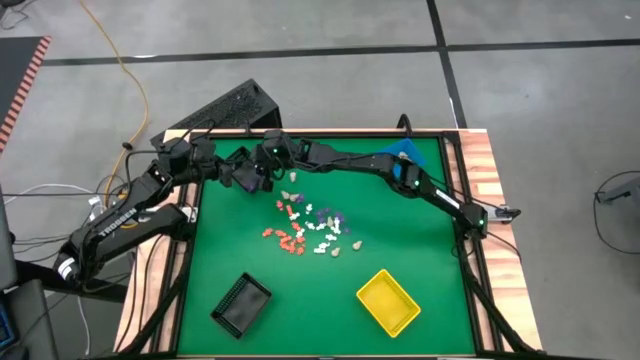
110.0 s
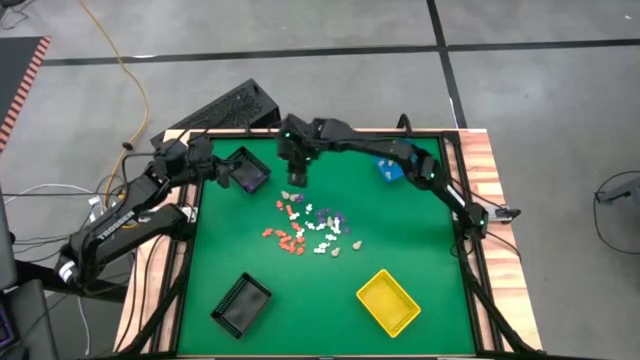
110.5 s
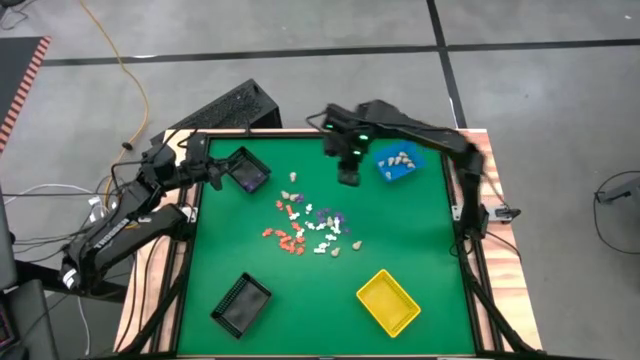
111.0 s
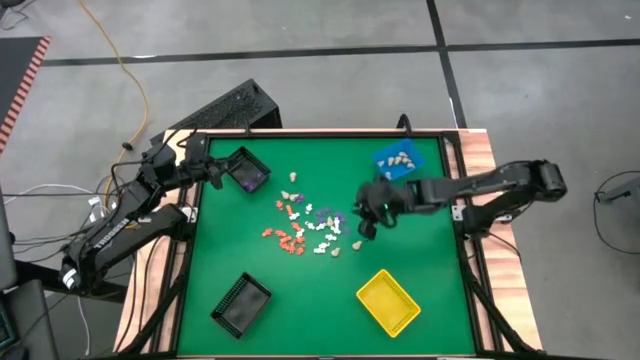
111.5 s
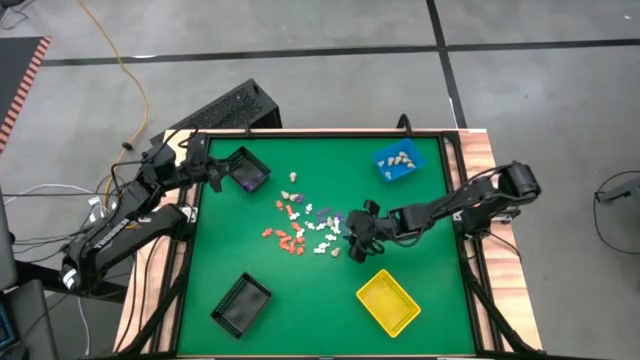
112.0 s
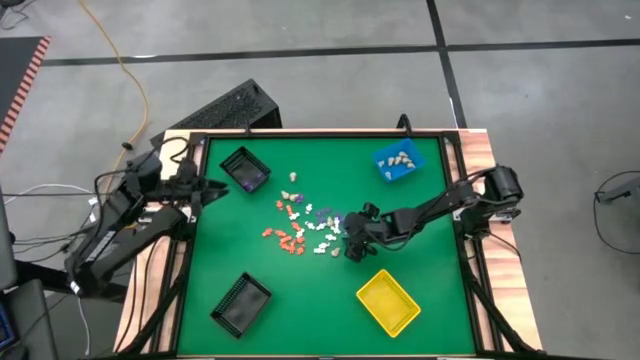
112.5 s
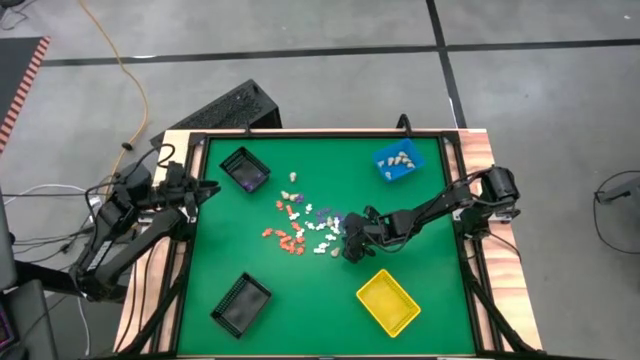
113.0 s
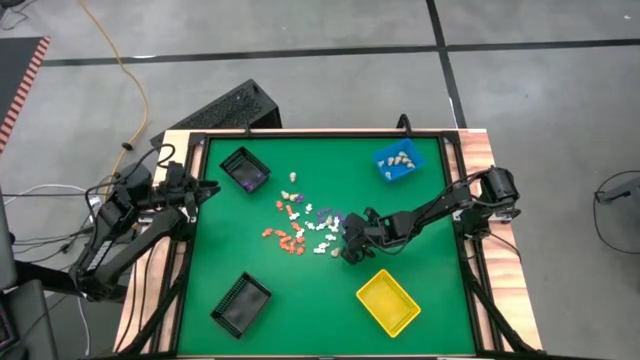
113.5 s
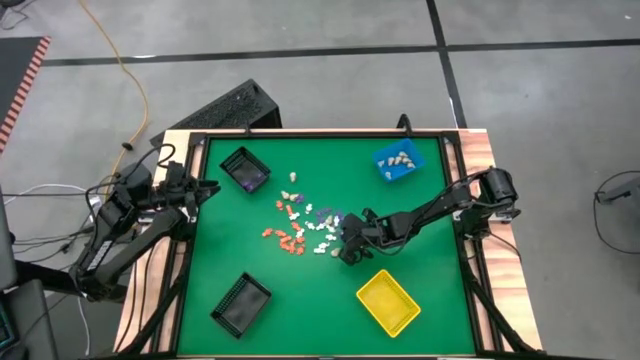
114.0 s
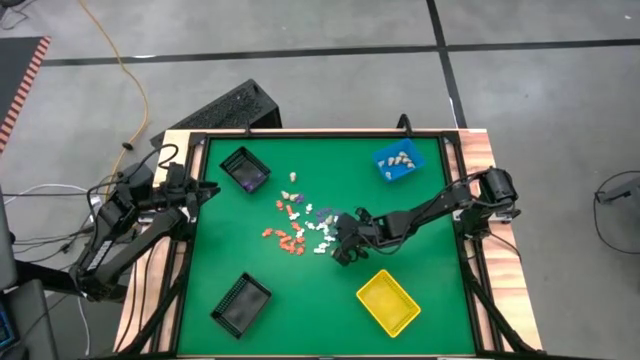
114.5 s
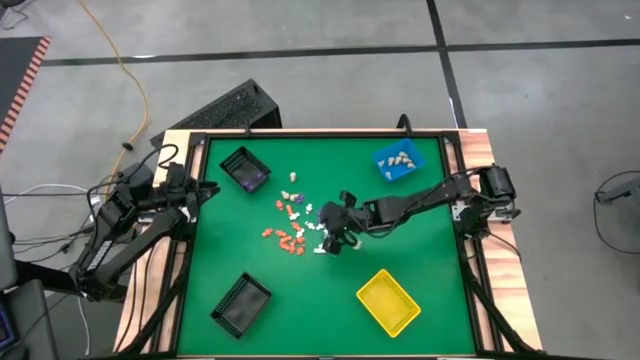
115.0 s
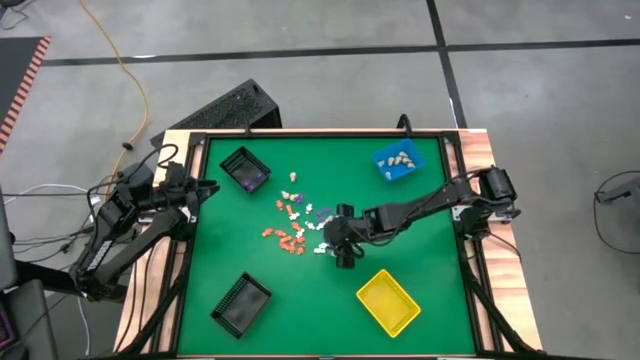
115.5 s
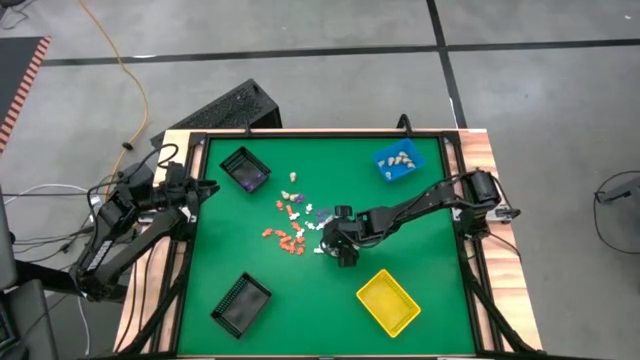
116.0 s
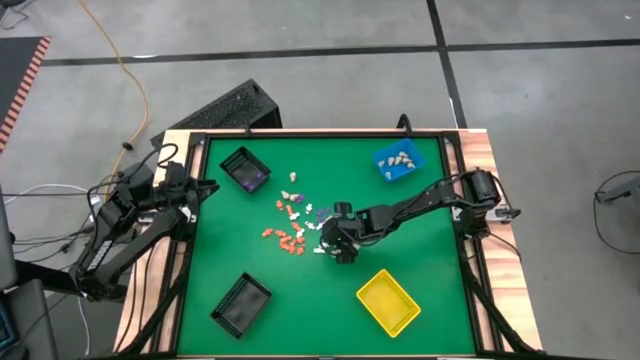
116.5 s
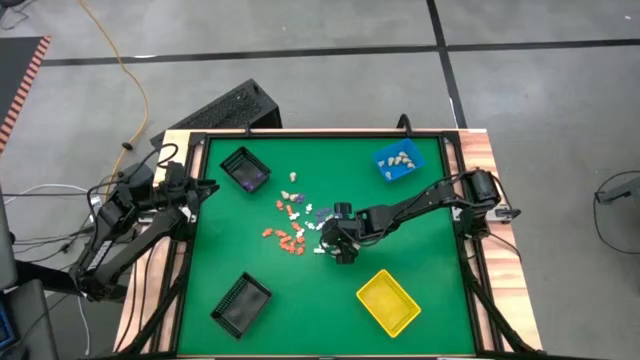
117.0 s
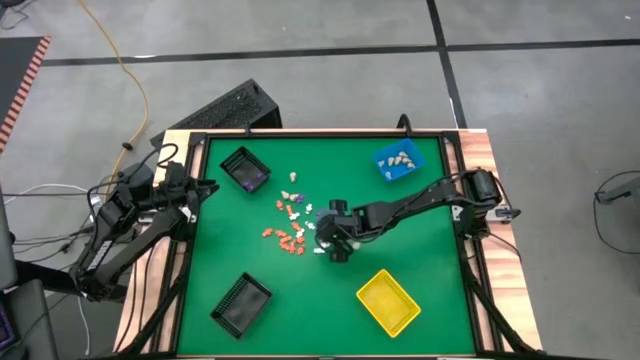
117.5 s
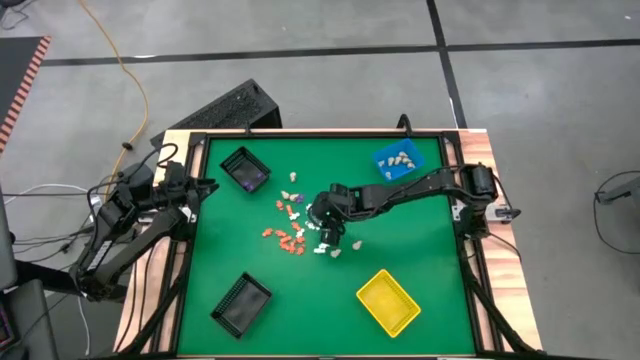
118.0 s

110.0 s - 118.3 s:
Task: Sort Halloween decoration
Put the purple spider toy into the top black basket

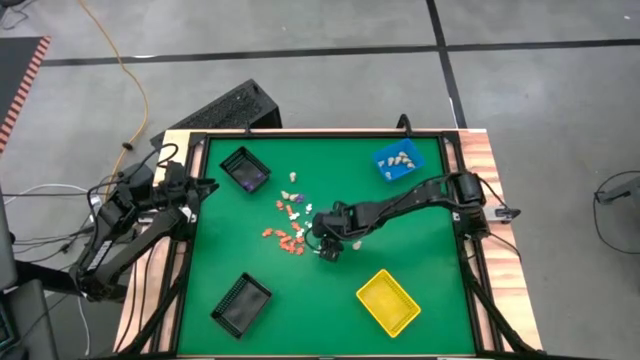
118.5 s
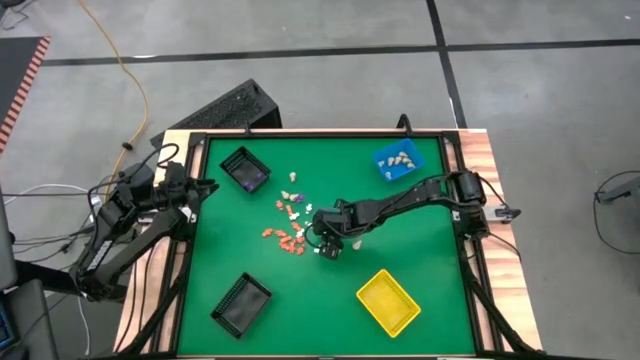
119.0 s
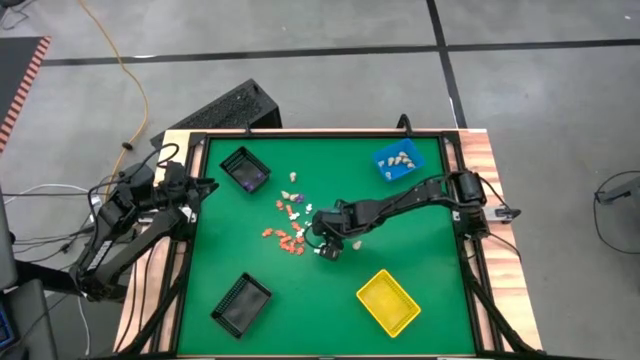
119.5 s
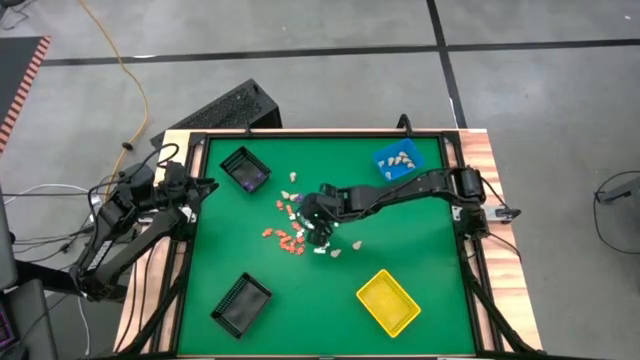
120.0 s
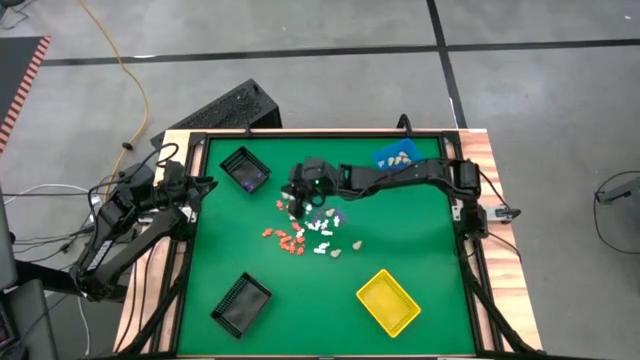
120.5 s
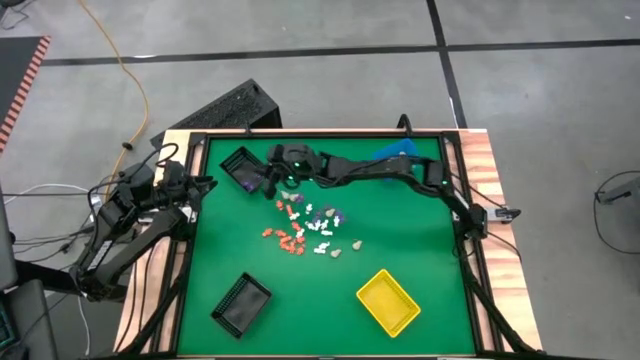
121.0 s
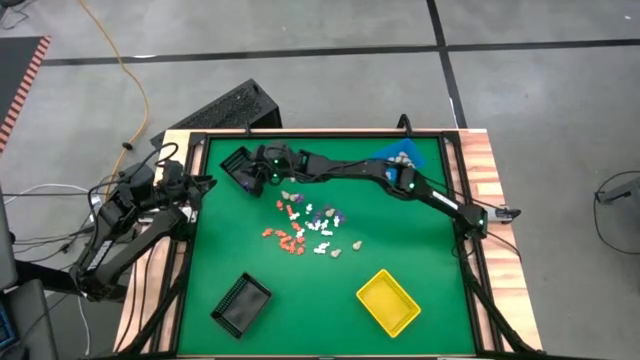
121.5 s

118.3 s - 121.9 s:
Put the purple spider toy into the top black basket

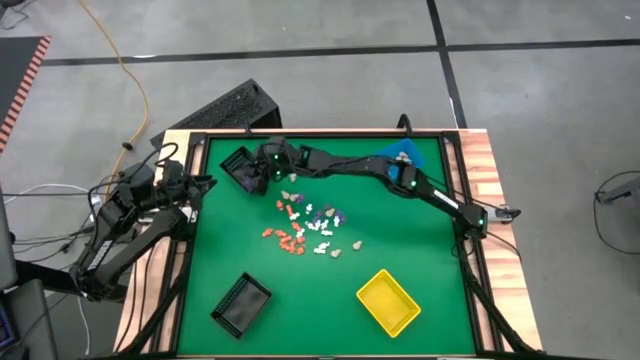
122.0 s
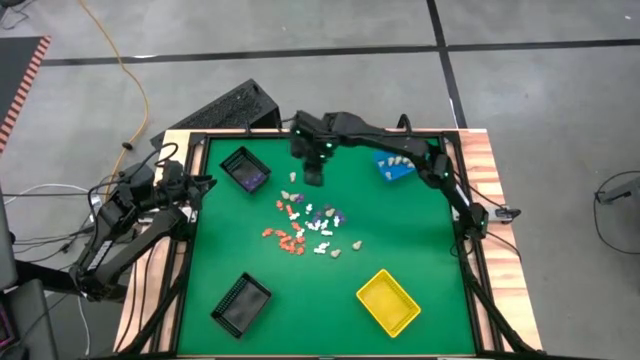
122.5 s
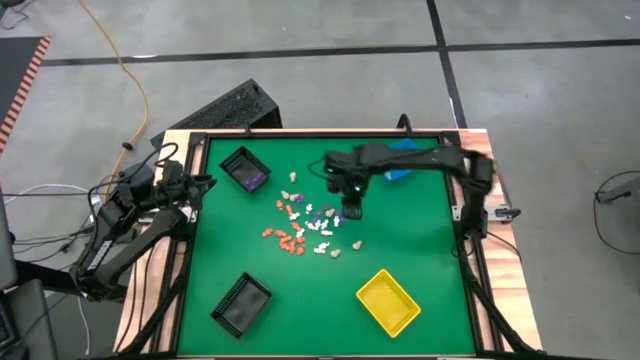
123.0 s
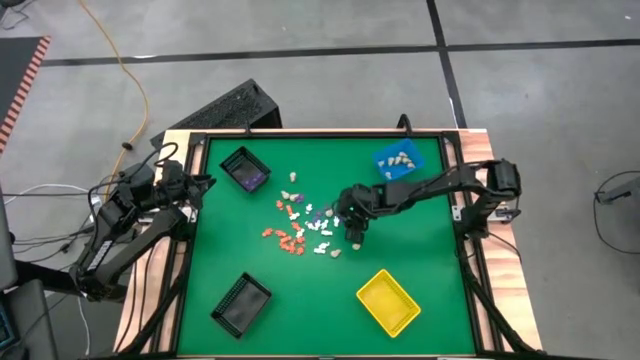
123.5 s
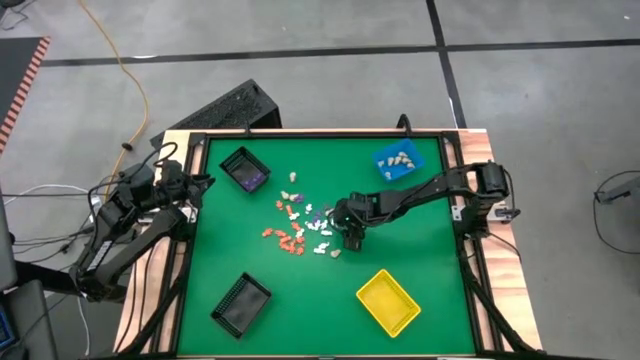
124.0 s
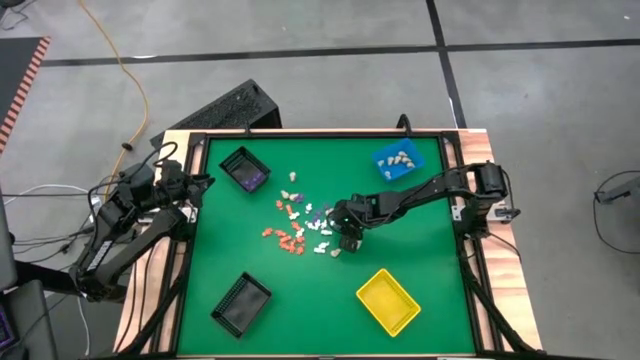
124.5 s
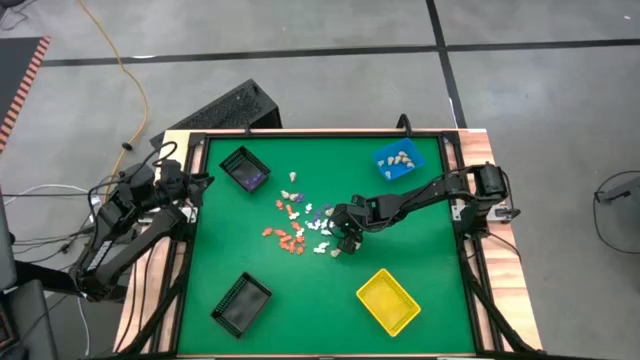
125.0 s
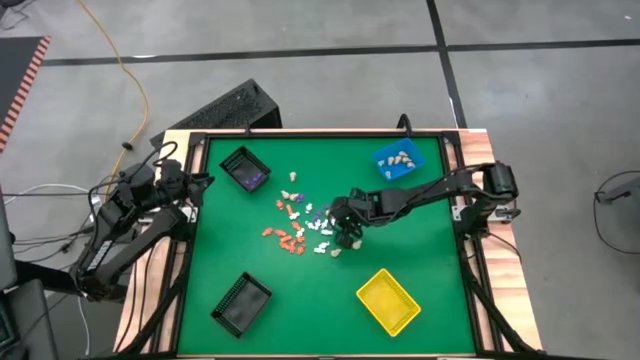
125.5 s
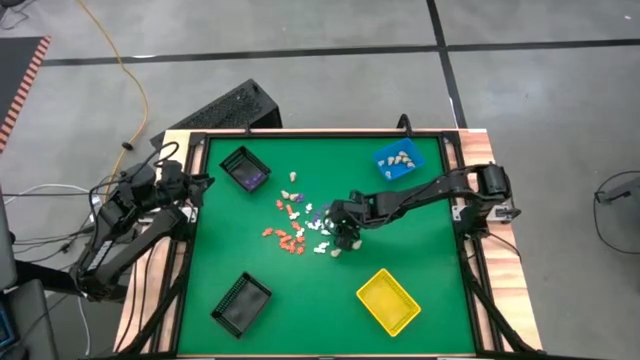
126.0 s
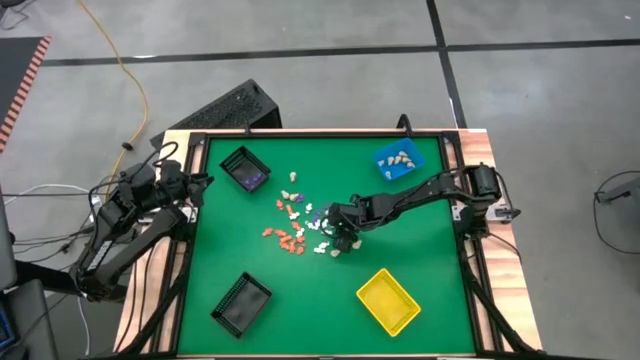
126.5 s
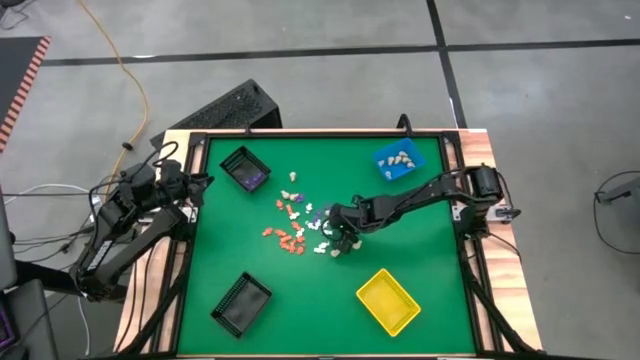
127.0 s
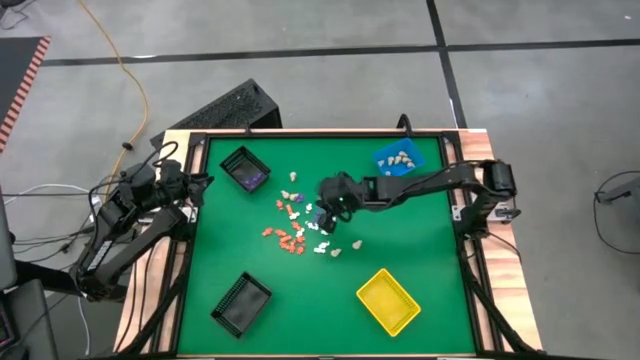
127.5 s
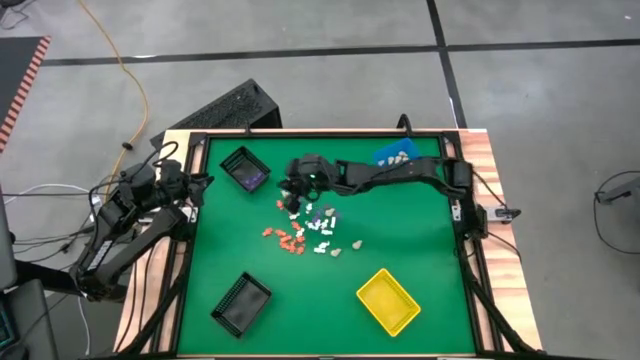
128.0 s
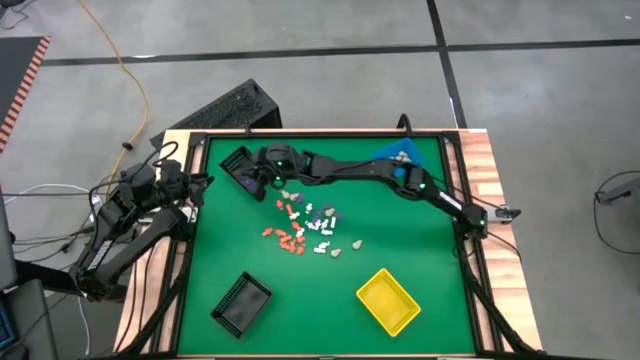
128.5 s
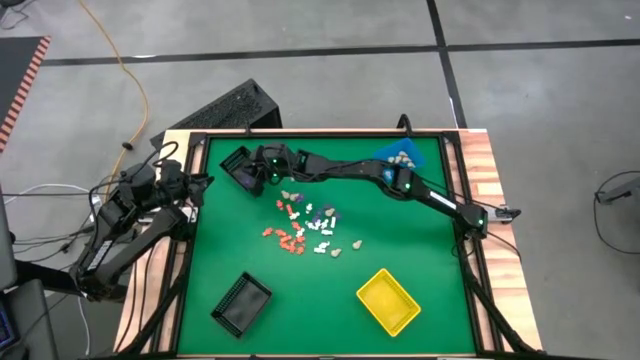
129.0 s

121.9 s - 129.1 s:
Put the purple spider toy into the top black basket

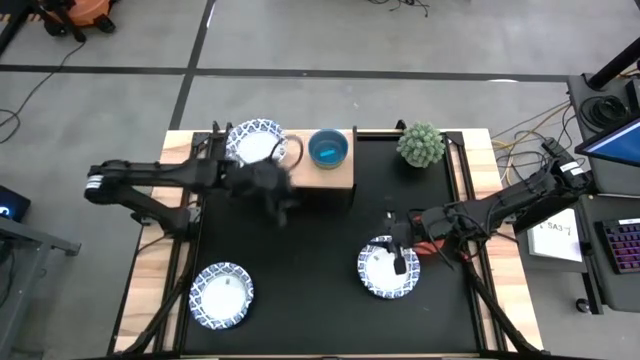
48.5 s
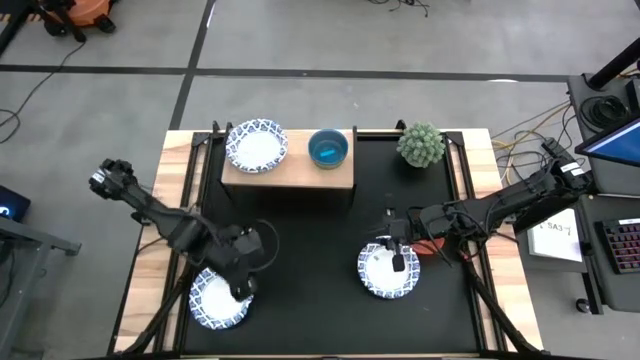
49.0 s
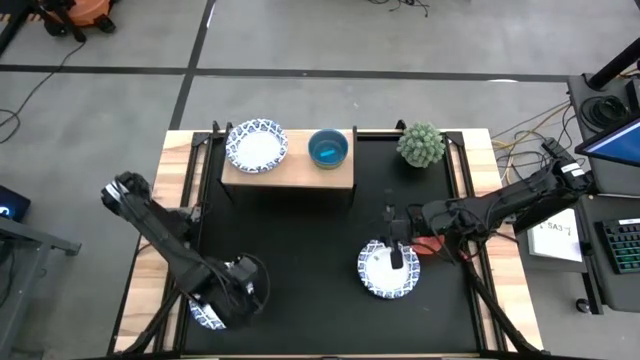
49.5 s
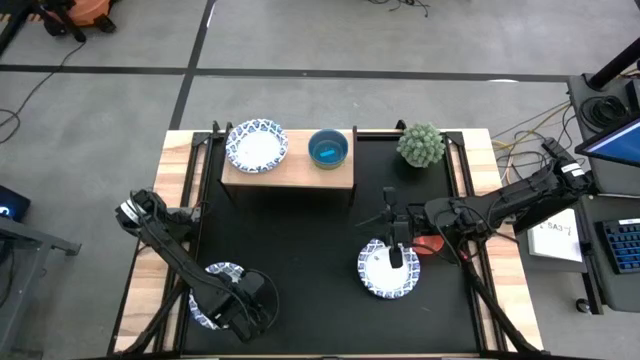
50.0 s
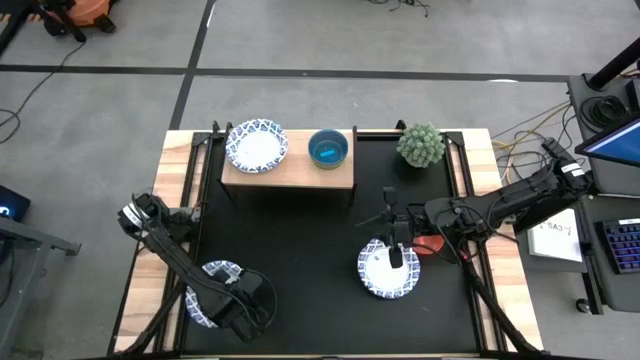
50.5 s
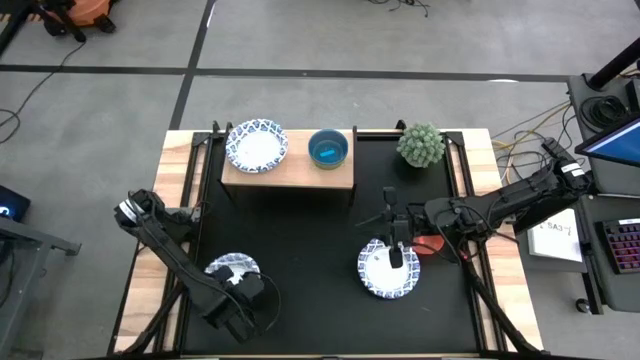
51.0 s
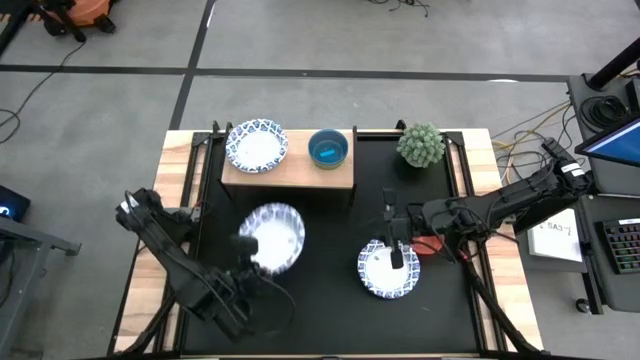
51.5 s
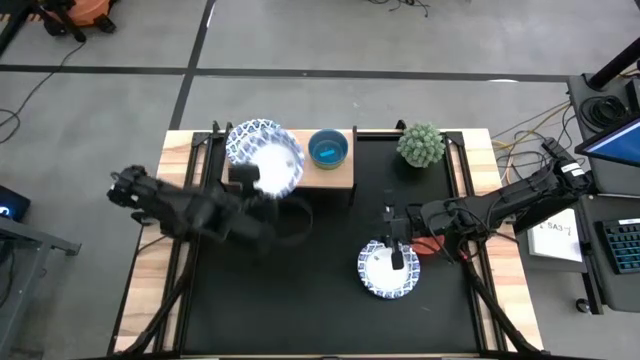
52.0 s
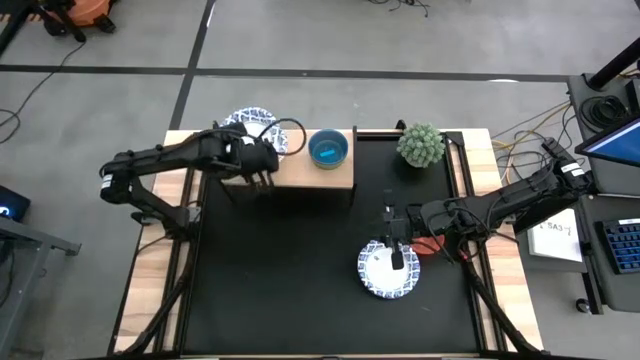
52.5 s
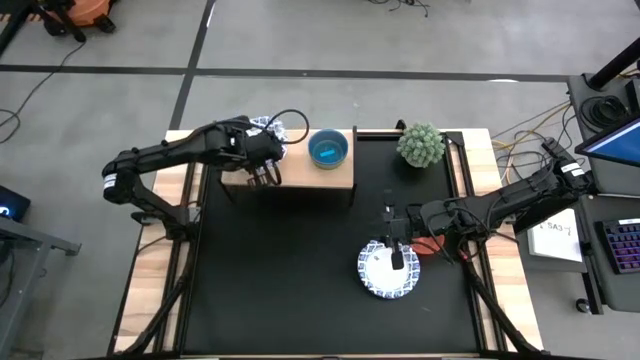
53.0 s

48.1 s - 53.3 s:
Task: Place and stack bowls onto a shelf
Stack the white bowl on top of the other bowl on the shelf
